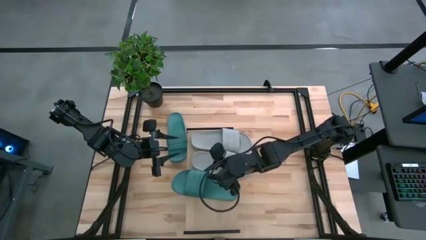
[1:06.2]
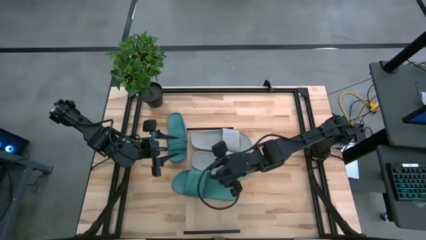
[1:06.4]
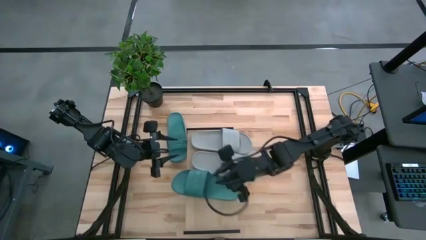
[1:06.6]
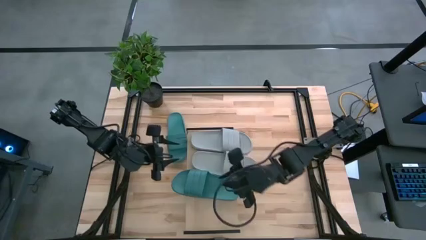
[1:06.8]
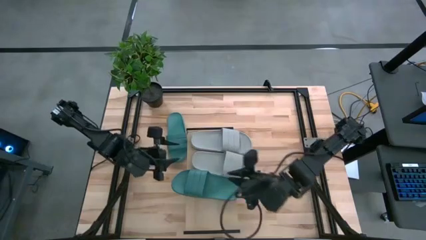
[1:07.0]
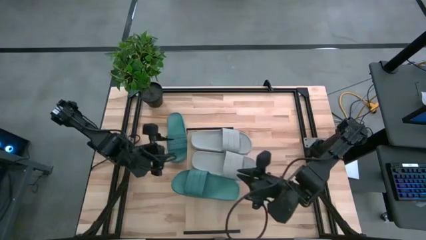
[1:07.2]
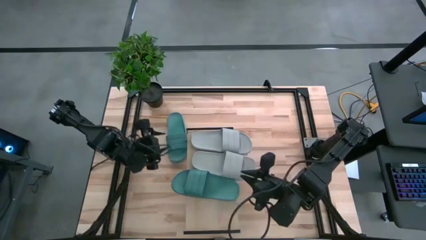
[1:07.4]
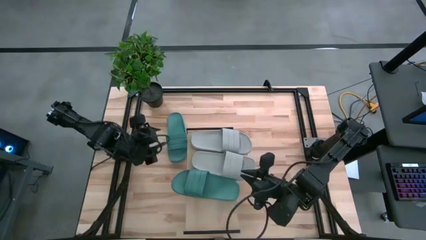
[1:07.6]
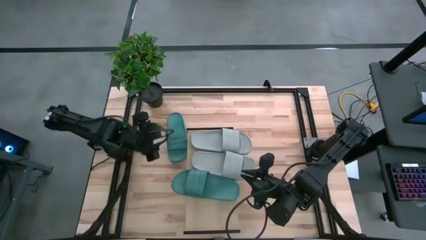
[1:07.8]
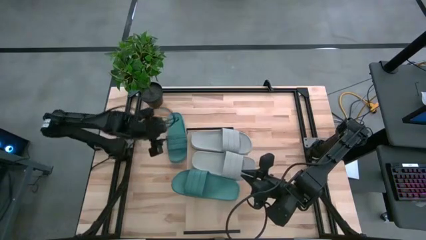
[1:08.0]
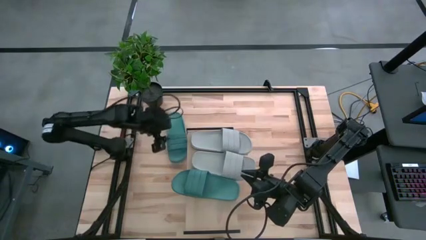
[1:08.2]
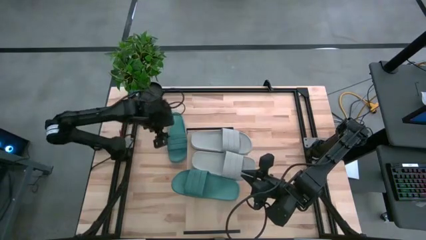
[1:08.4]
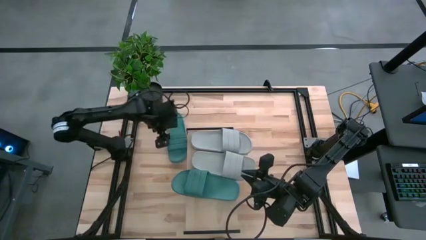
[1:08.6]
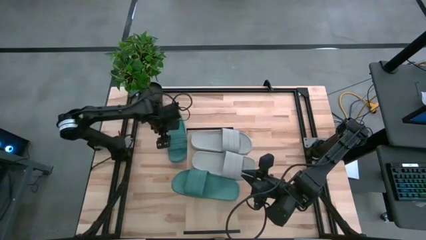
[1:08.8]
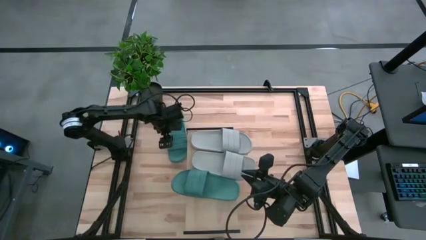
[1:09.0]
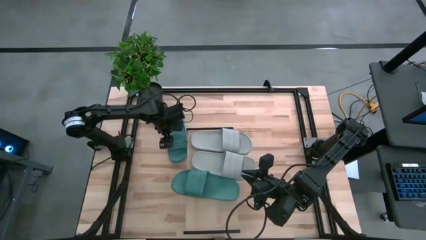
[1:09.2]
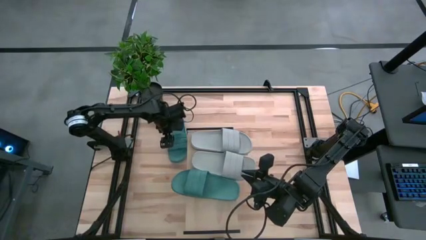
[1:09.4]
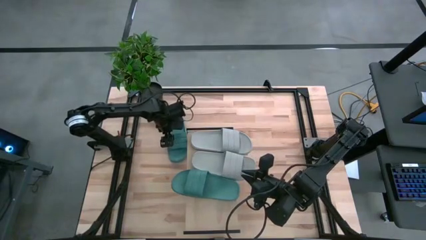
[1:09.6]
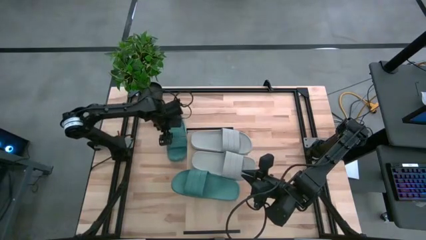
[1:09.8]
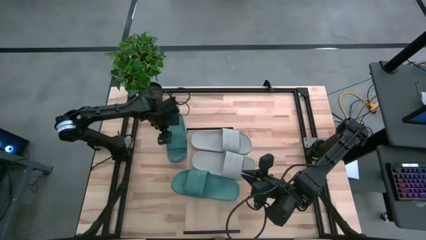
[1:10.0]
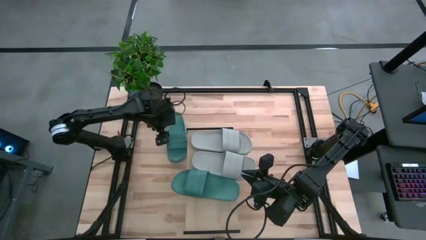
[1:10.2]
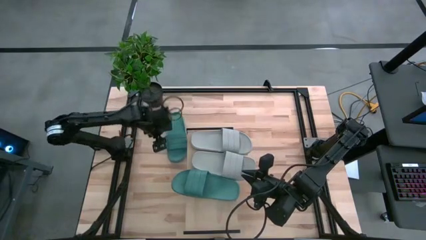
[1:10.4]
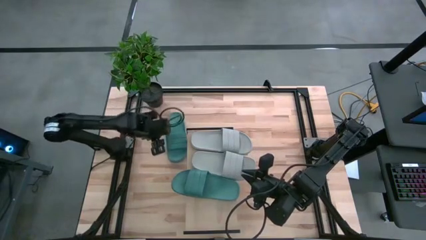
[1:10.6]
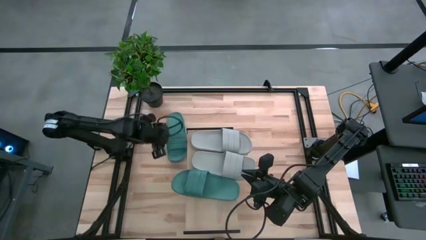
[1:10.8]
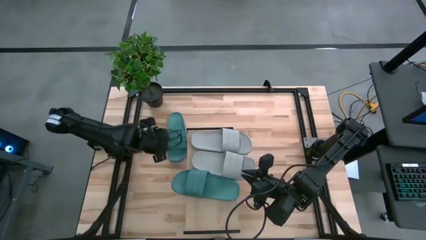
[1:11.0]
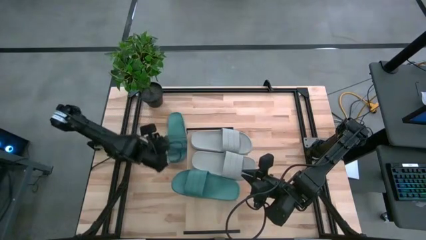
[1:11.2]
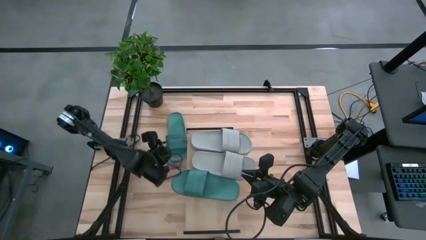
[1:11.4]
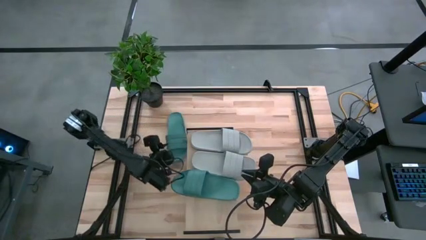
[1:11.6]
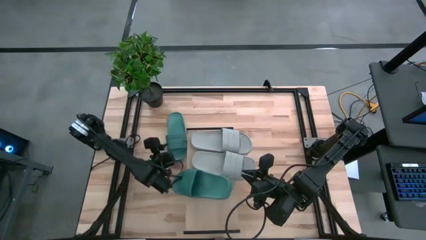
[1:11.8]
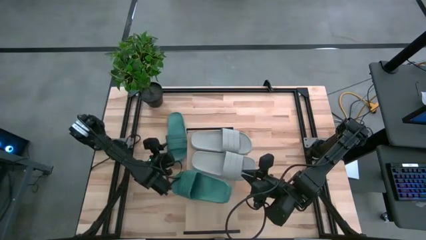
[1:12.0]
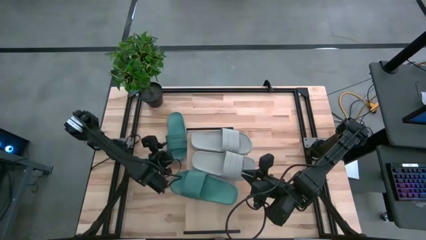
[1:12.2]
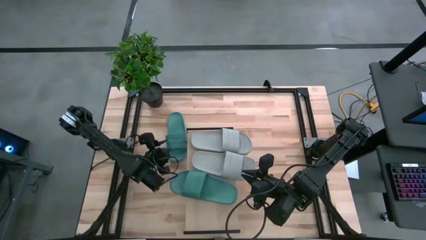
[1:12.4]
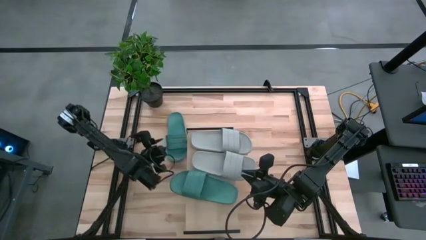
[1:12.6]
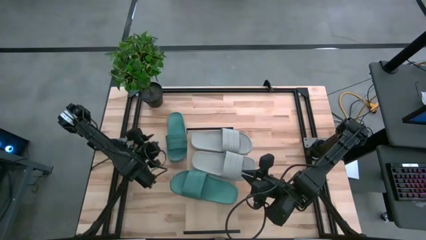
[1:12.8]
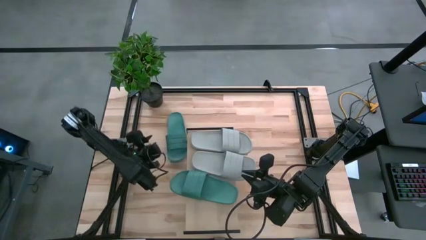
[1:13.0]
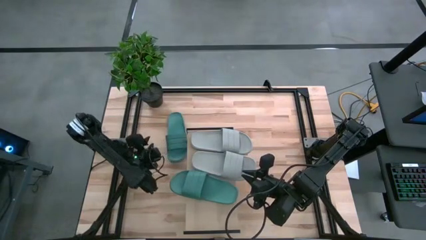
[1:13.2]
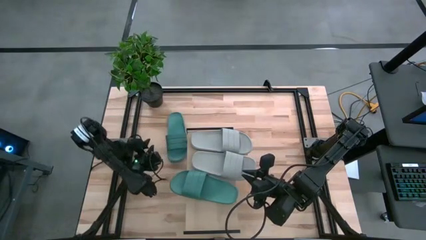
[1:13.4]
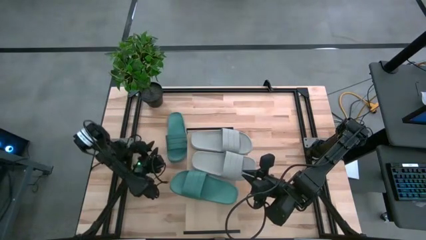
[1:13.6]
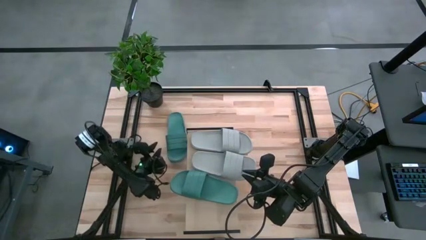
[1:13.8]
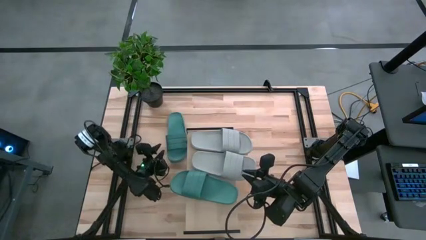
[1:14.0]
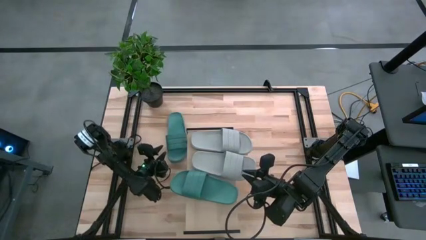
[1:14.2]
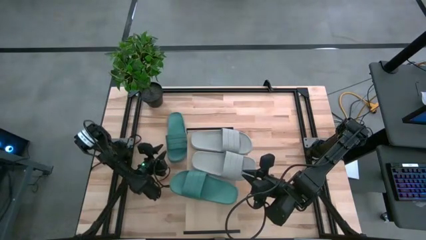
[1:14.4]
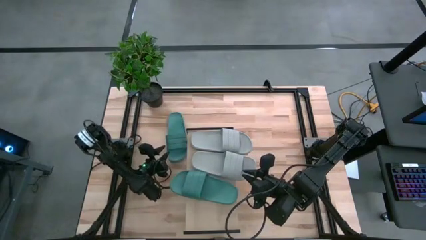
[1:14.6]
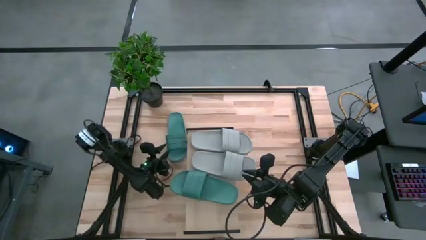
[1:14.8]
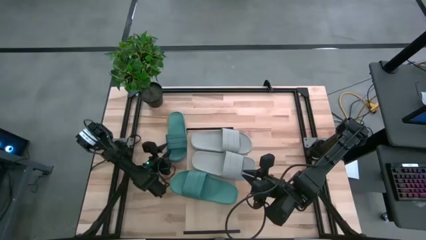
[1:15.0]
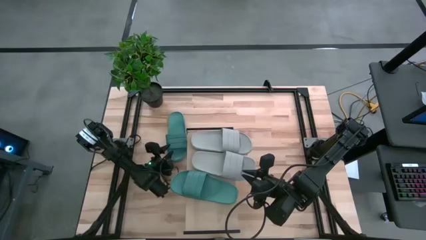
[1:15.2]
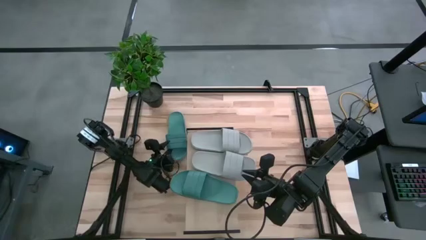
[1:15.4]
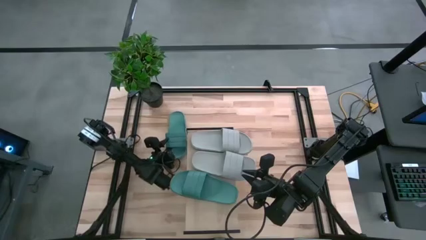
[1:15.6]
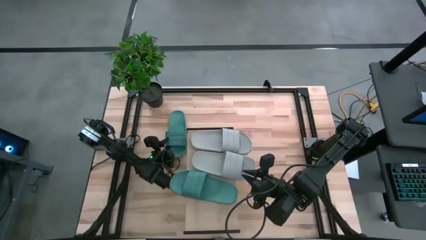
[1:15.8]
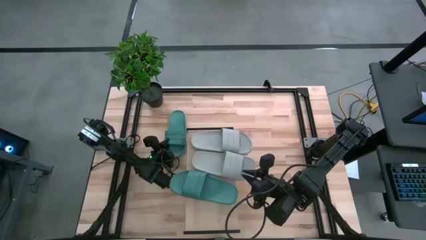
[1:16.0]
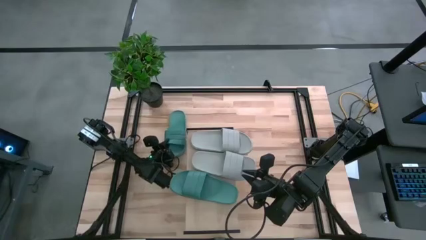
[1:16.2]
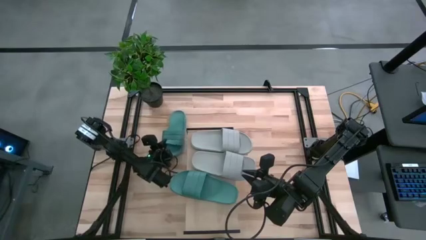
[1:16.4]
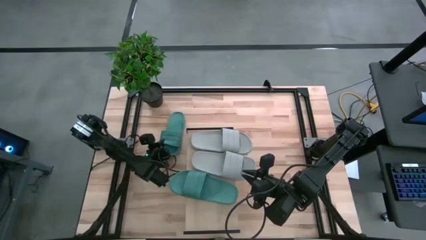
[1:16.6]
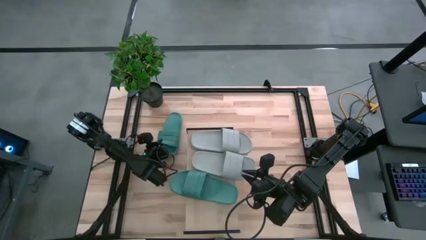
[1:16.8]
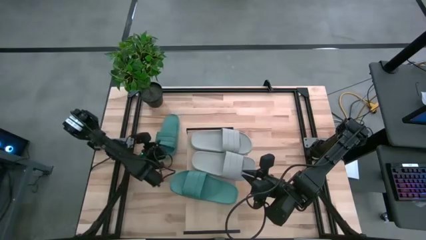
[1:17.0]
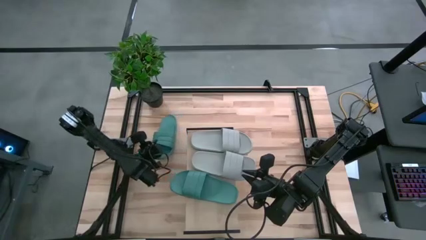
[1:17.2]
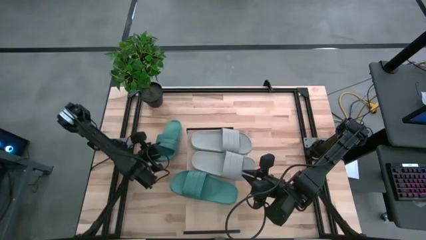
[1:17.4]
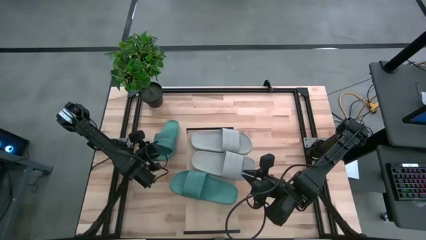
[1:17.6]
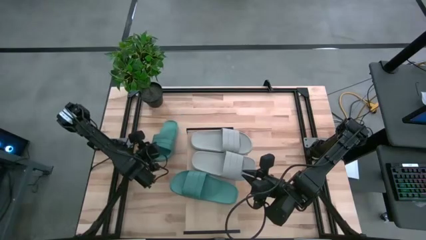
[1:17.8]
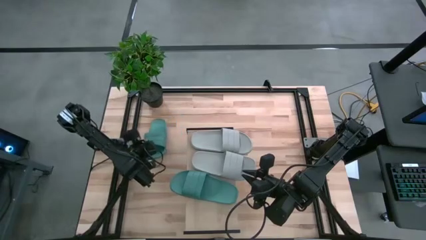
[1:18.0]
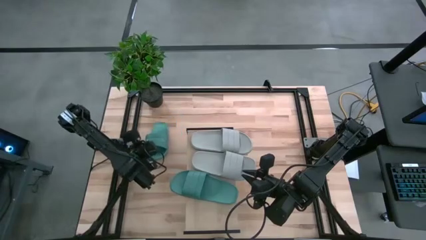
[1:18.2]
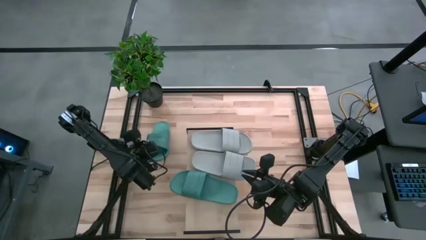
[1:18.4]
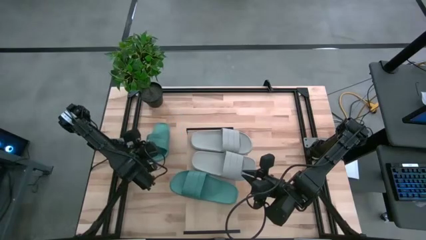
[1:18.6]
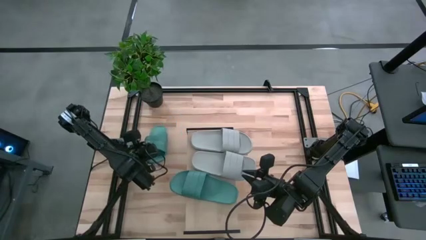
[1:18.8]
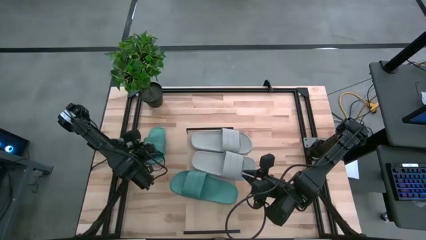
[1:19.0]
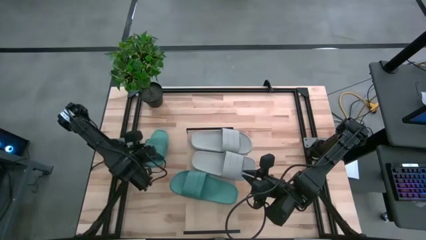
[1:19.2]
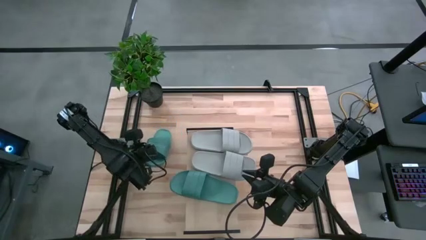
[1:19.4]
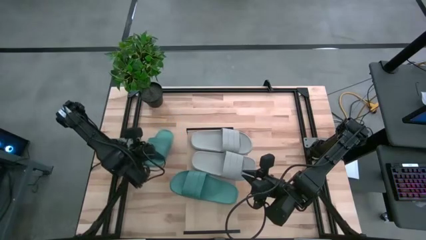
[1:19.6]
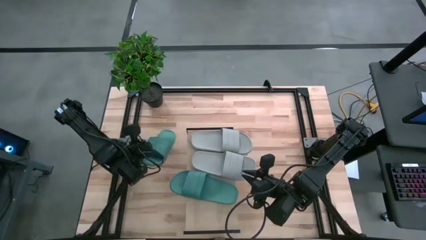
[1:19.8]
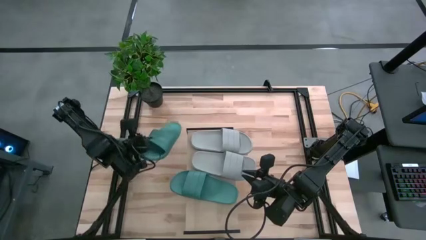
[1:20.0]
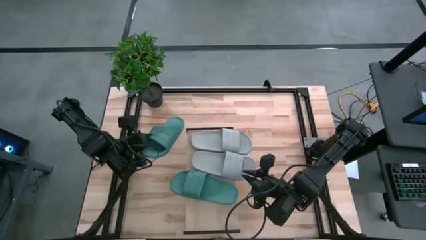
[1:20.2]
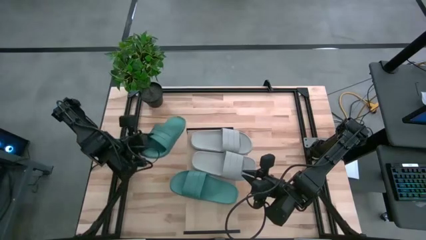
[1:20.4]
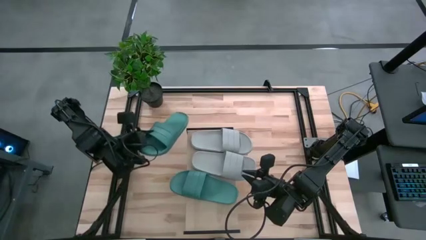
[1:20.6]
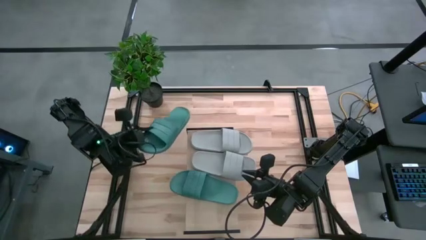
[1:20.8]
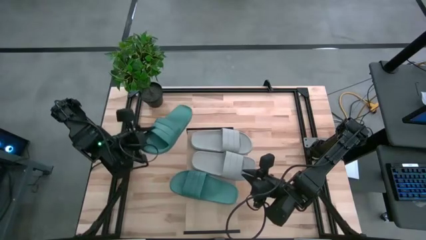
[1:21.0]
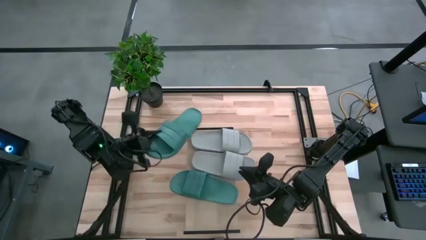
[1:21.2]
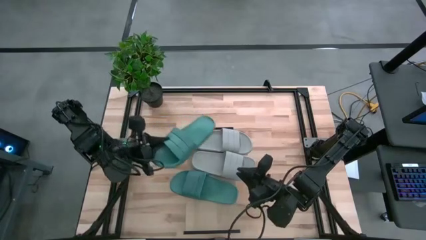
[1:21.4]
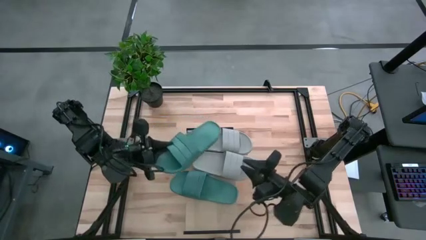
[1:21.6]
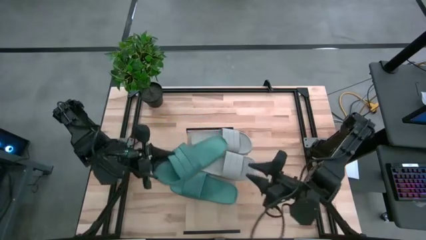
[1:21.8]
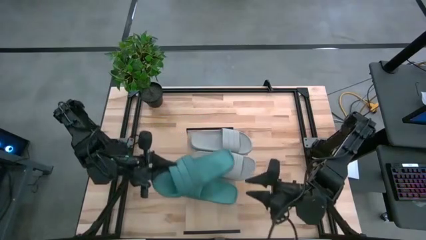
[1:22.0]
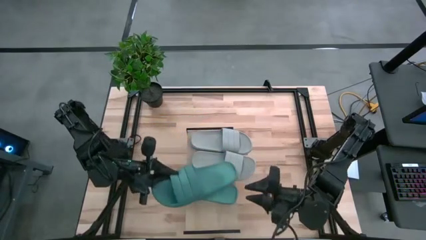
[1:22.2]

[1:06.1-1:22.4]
Task: Pick and place slides into the shelf
Put the green slipper on the shelf
